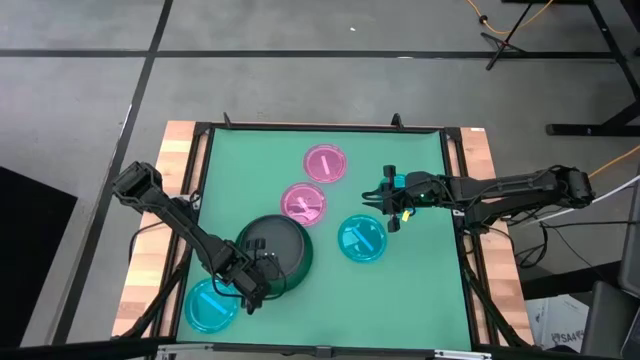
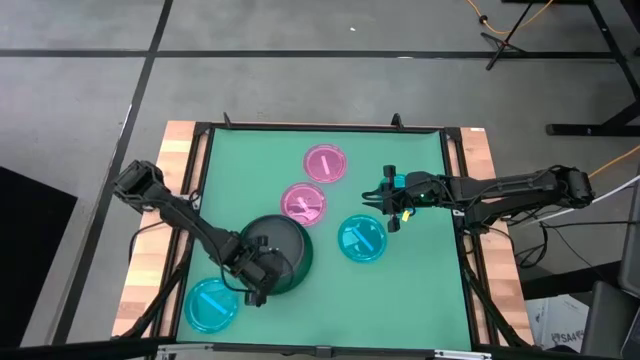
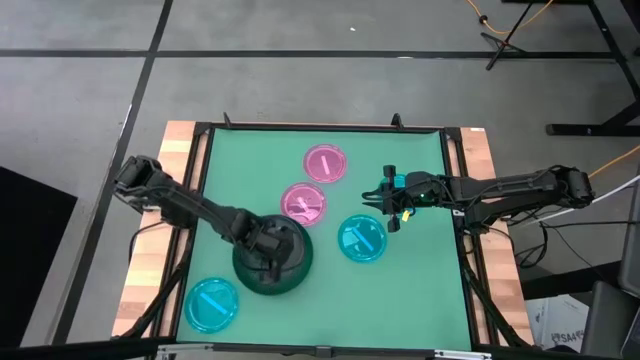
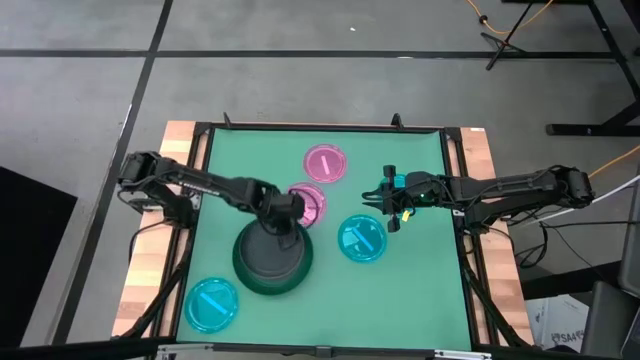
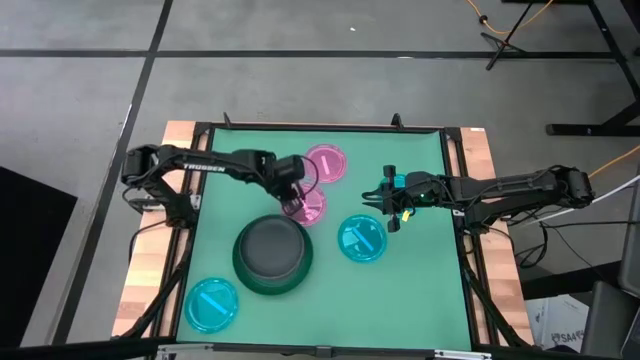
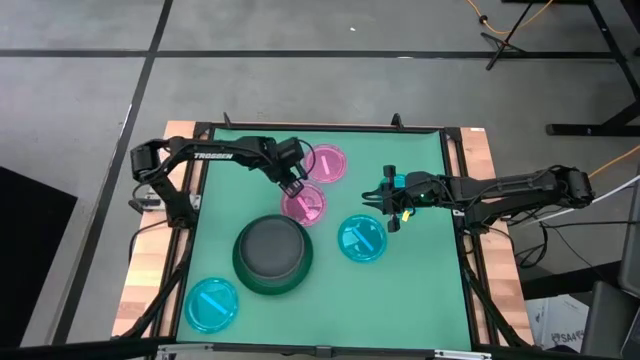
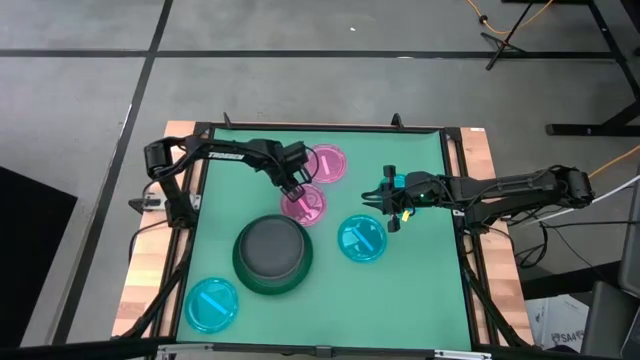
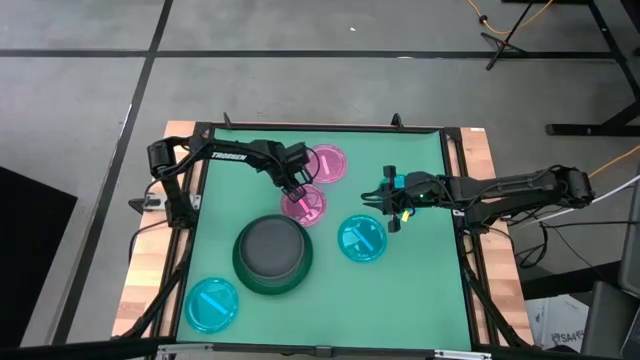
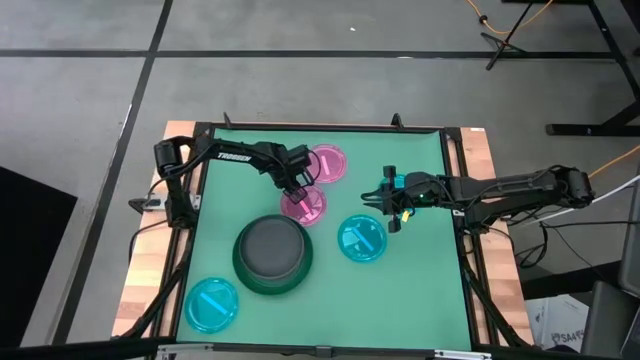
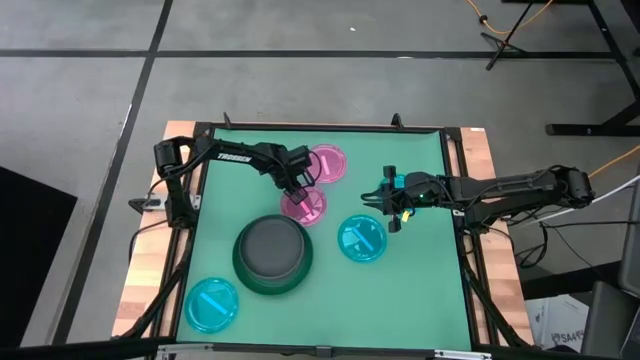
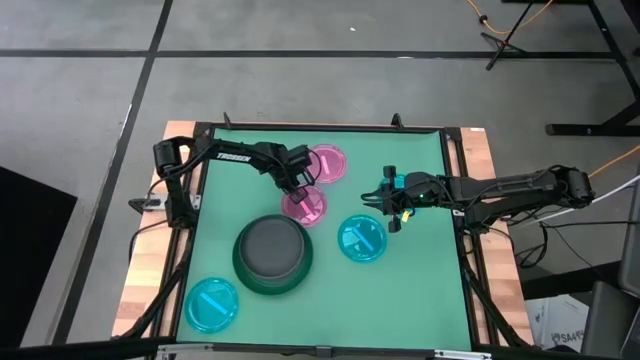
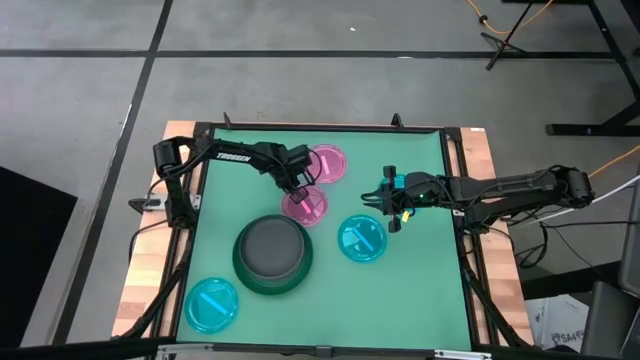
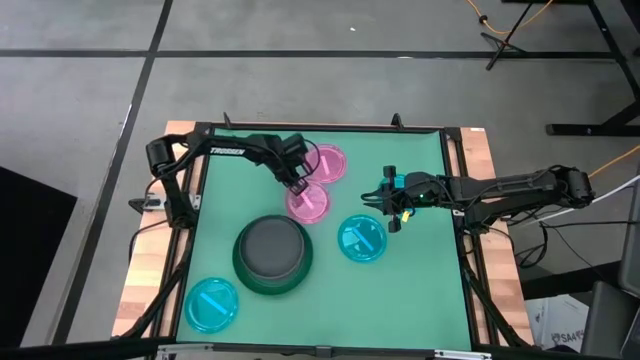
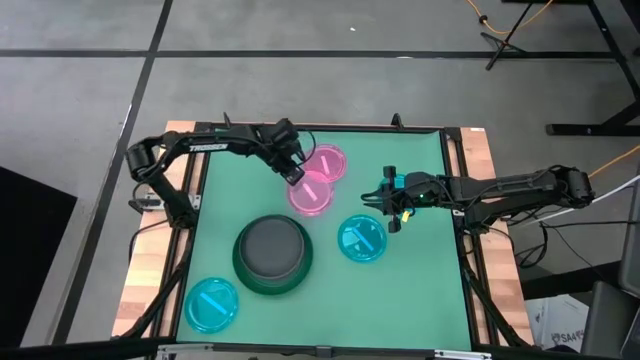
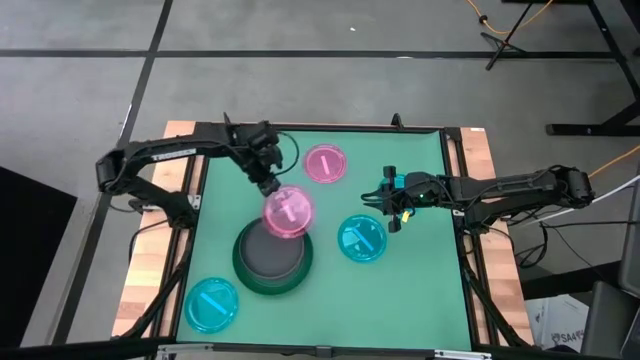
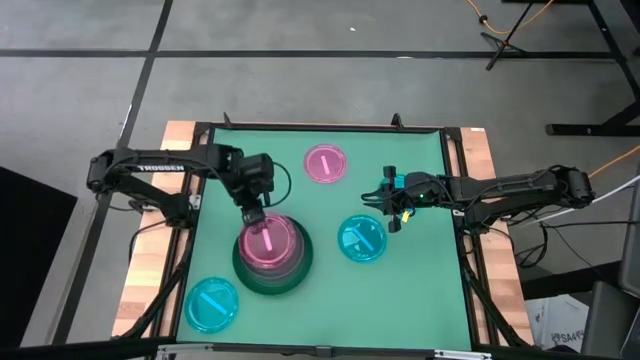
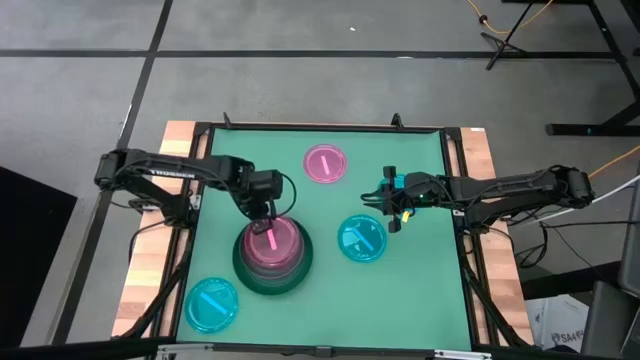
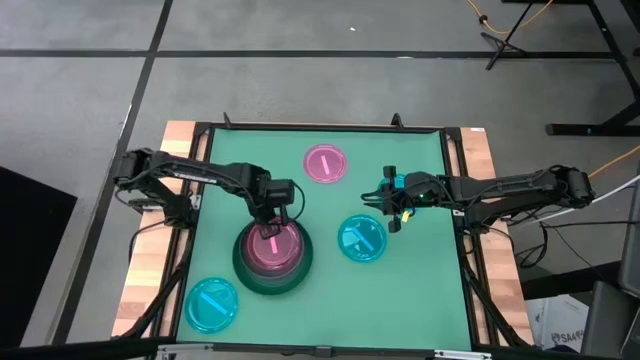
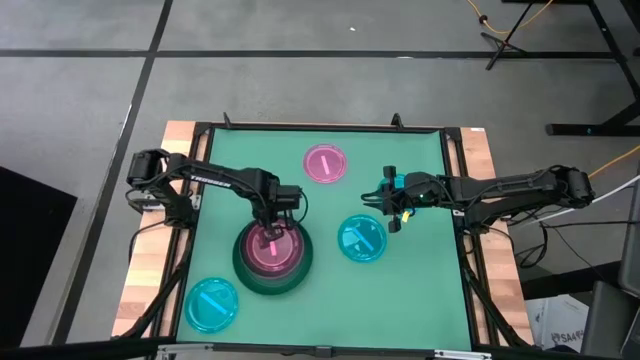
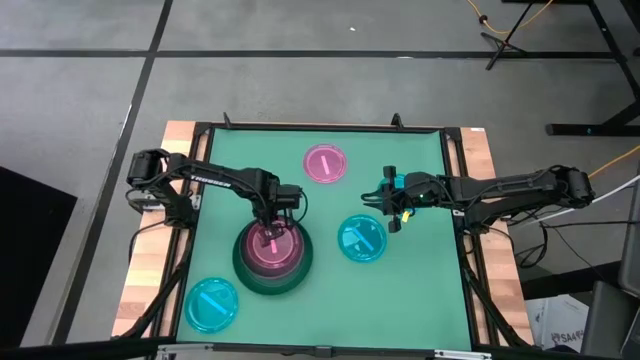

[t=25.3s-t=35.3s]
Task: Stack plastic plates
Stack the bottom light pink plate on top of the black plate

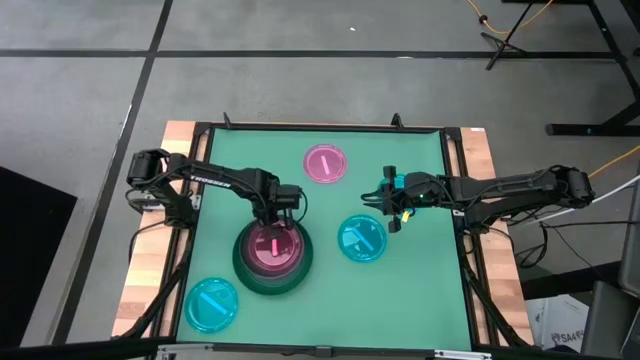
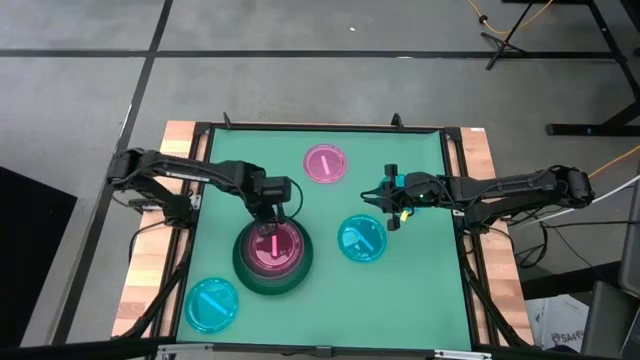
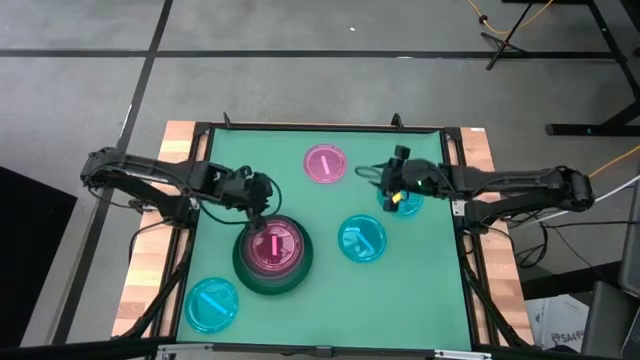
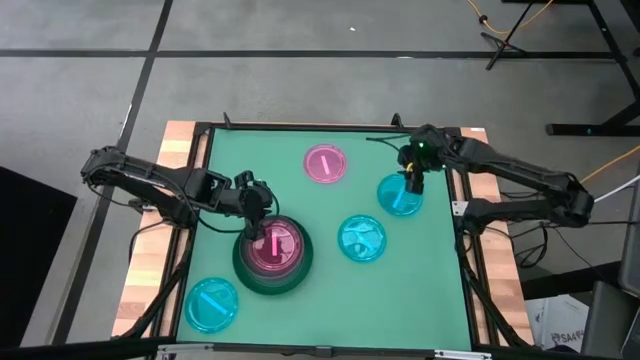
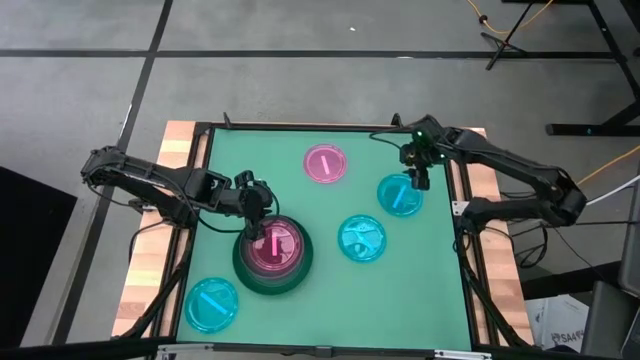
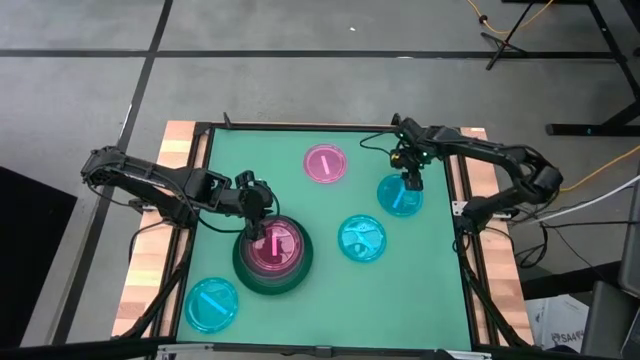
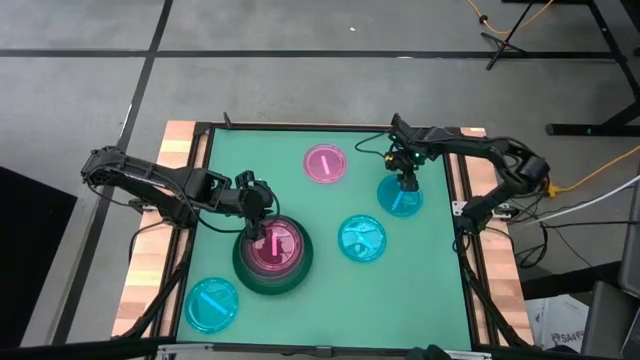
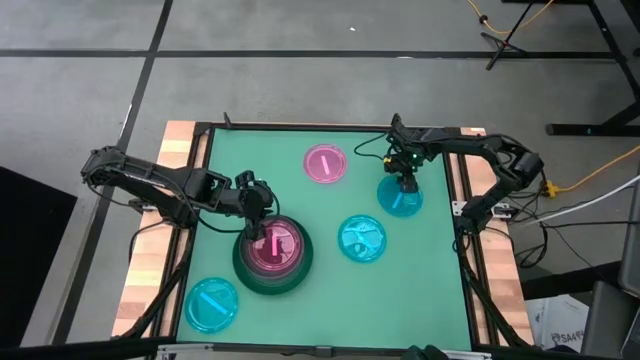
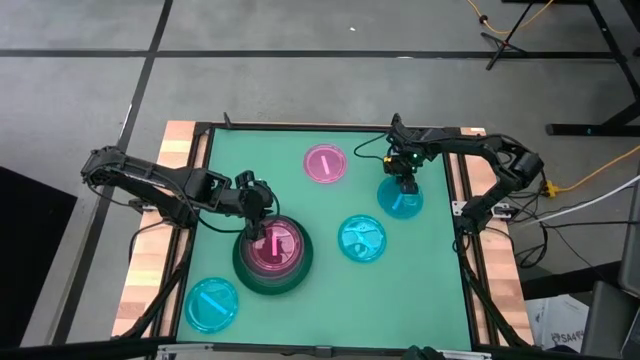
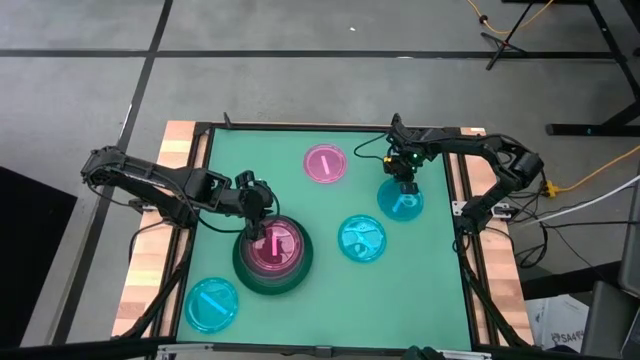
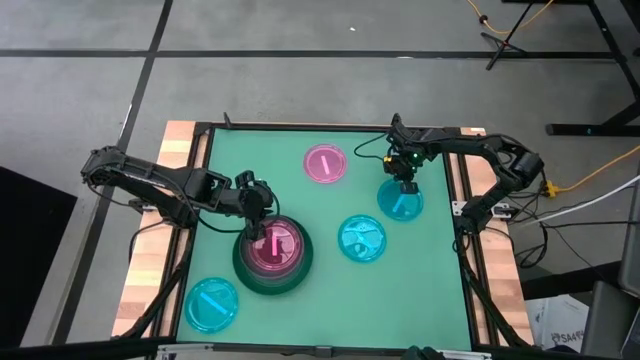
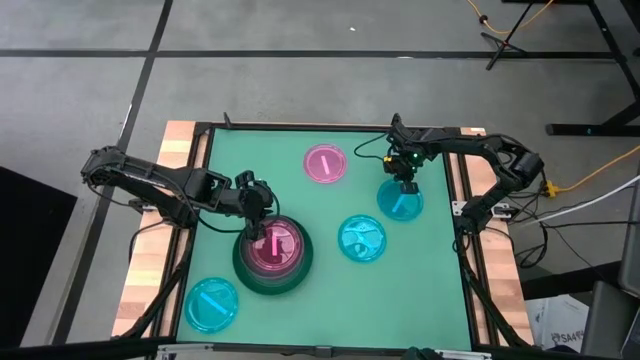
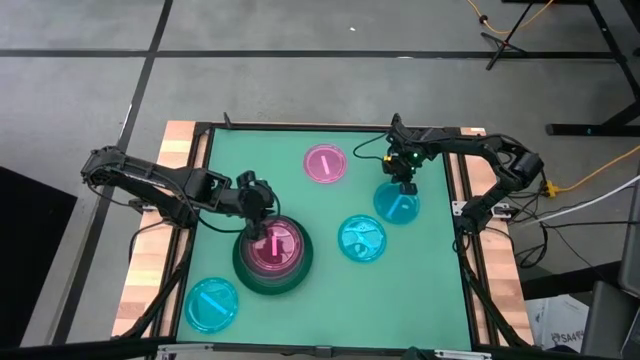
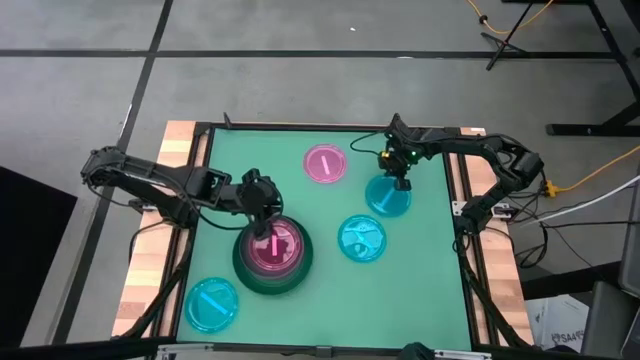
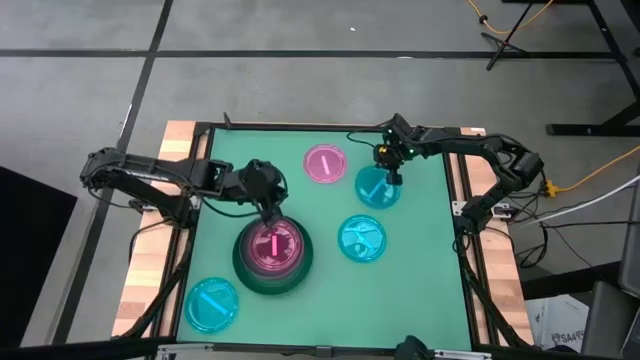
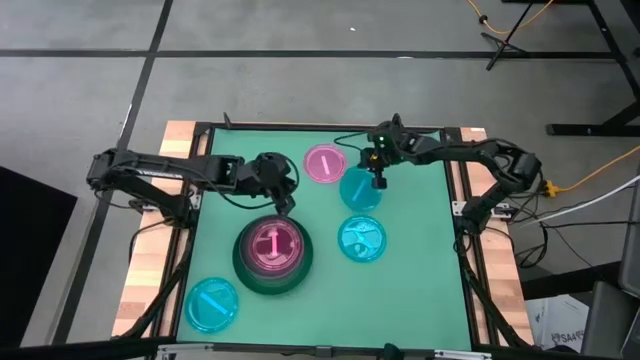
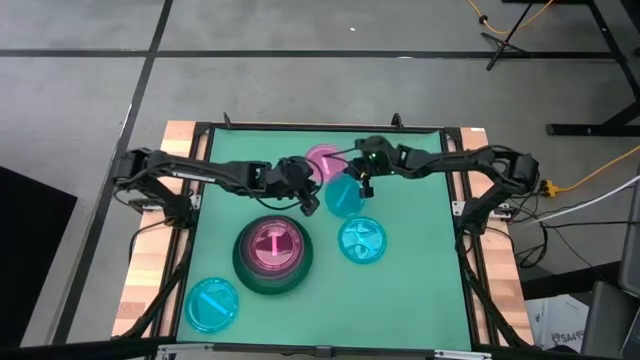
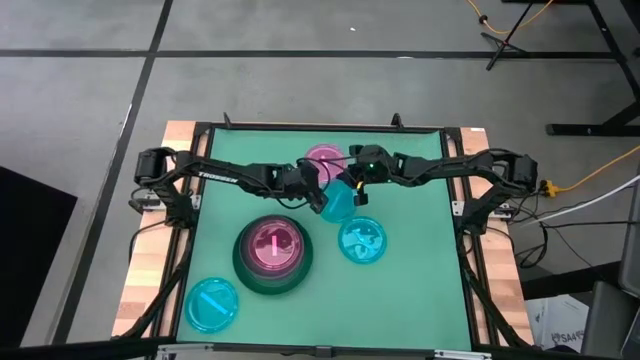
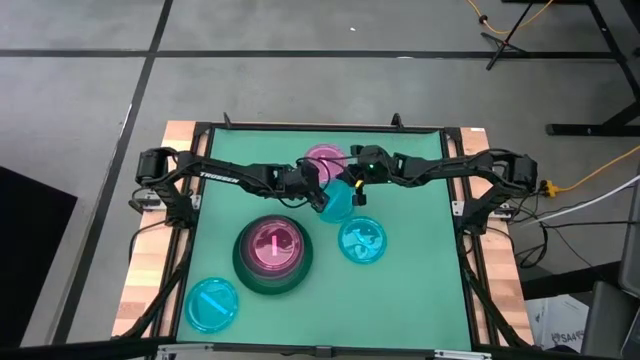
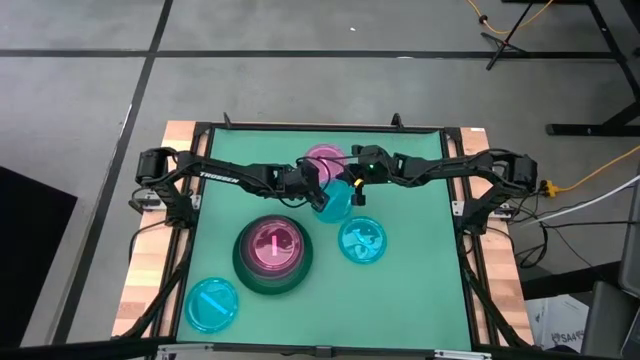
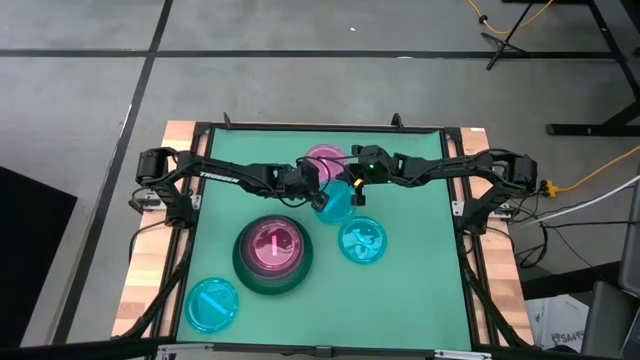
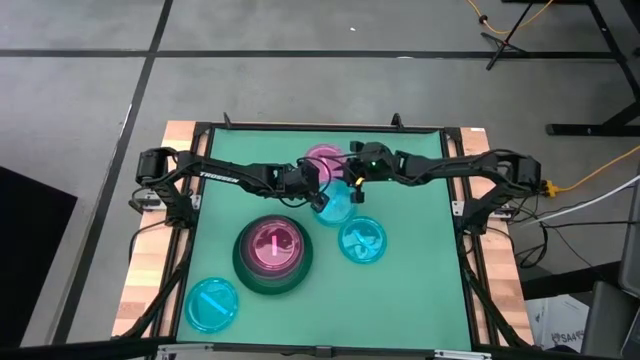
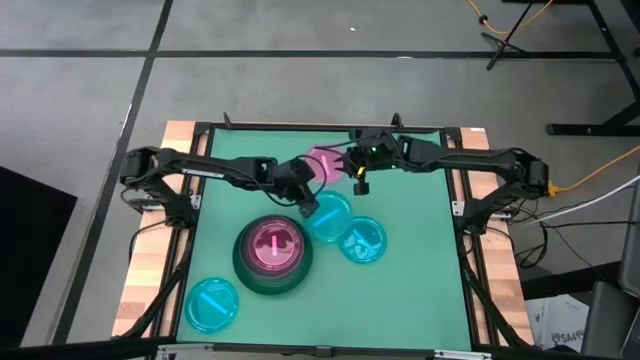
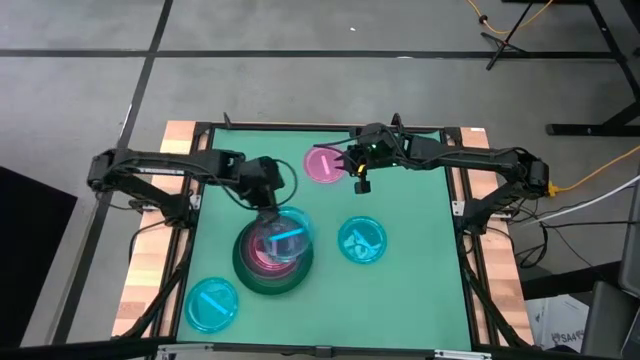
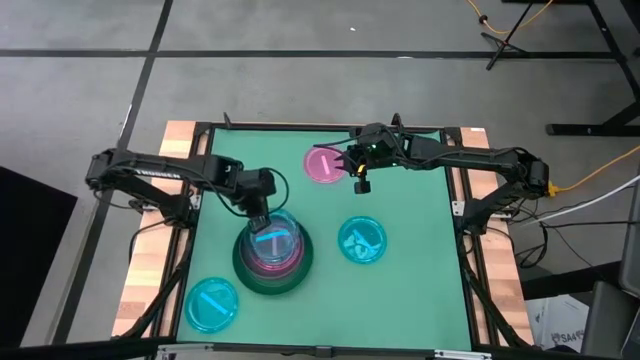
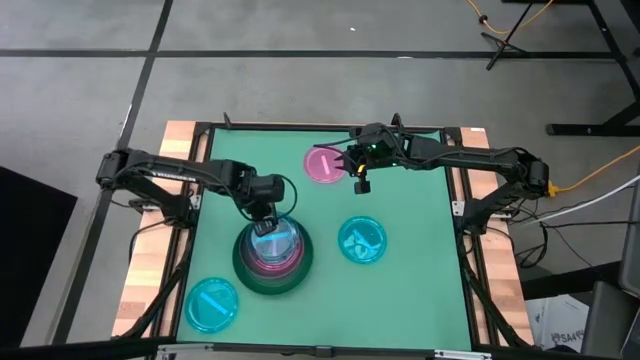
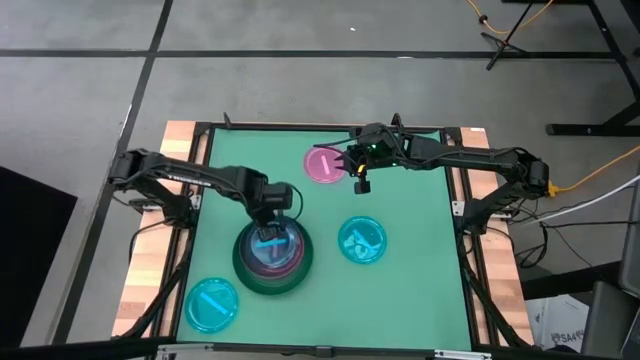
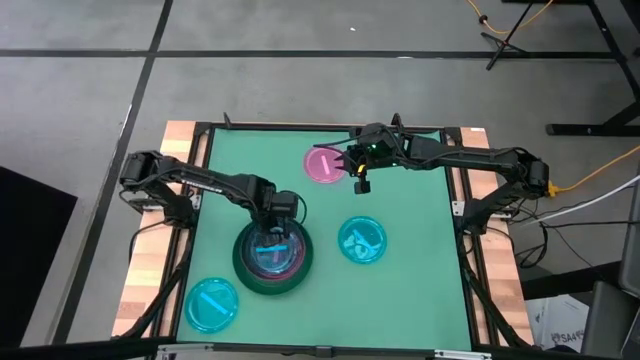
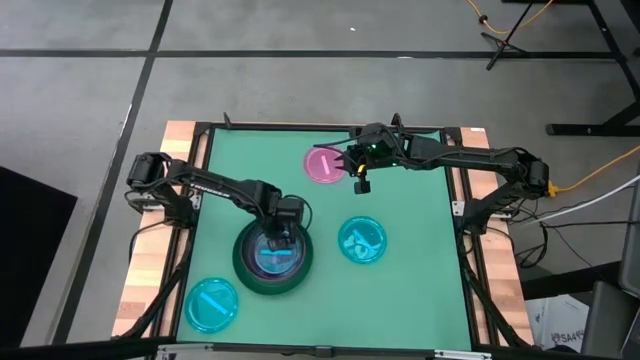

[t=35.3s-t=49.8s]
Stack the top light blue plate on top of the stacked light pink plate
